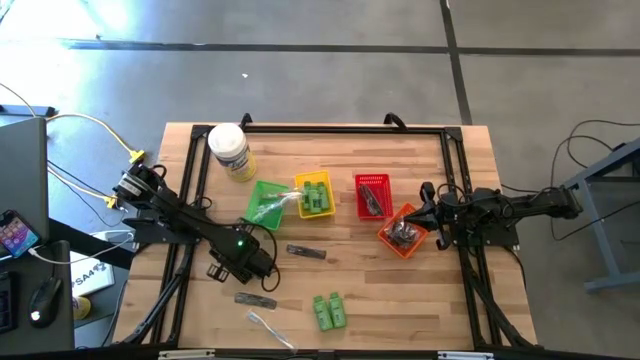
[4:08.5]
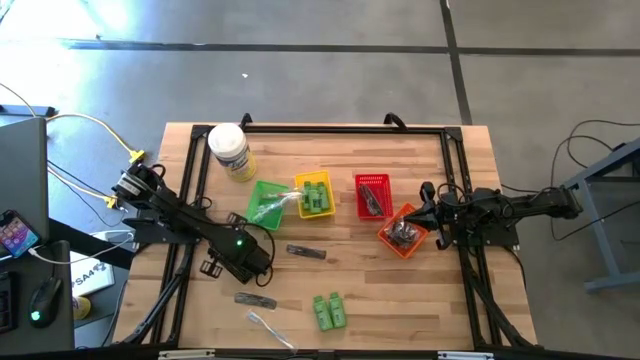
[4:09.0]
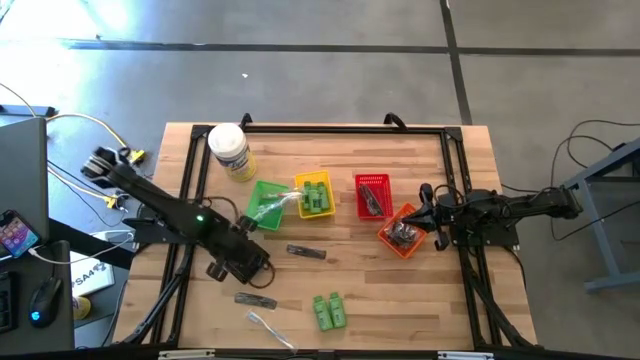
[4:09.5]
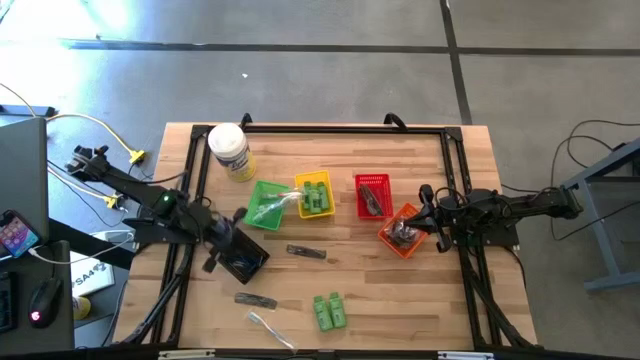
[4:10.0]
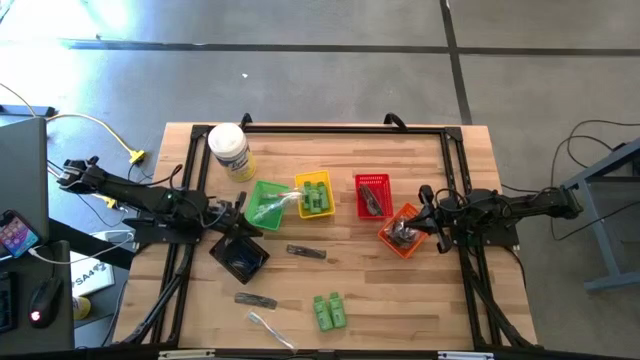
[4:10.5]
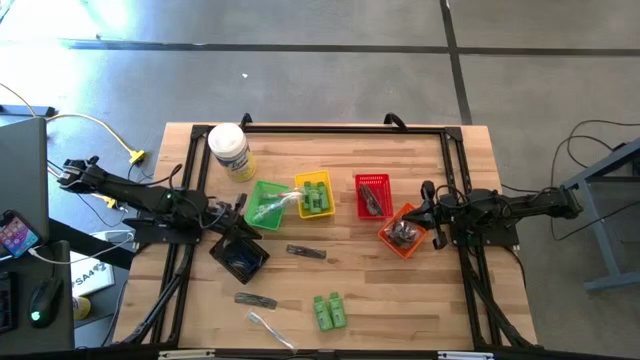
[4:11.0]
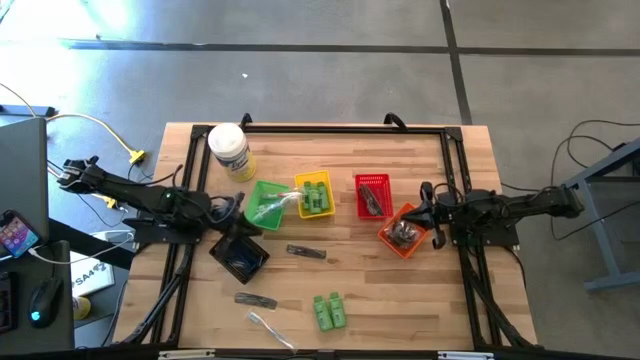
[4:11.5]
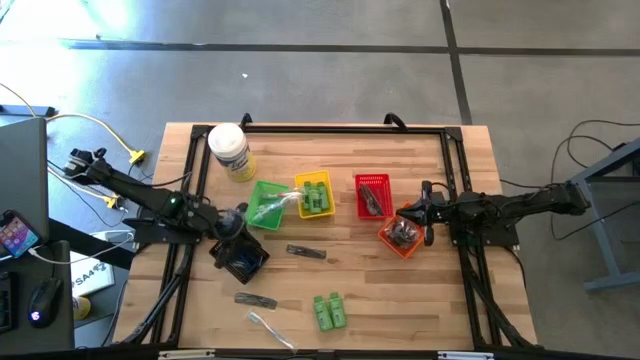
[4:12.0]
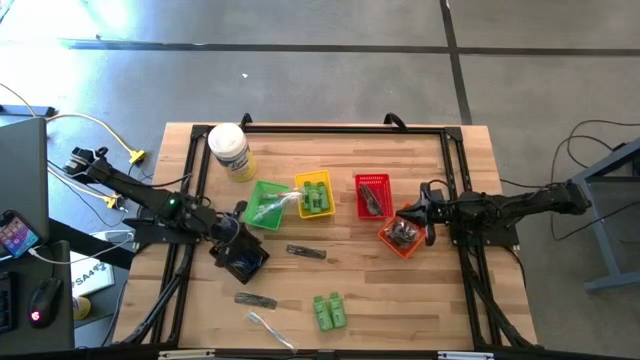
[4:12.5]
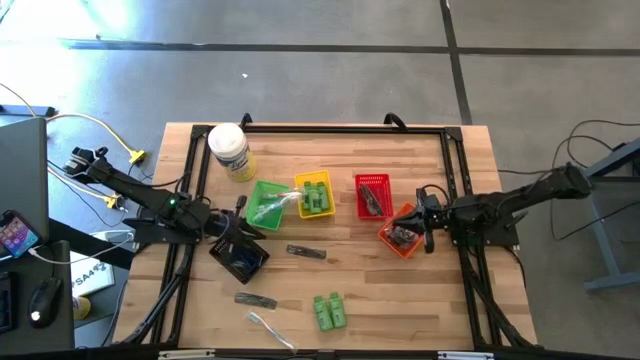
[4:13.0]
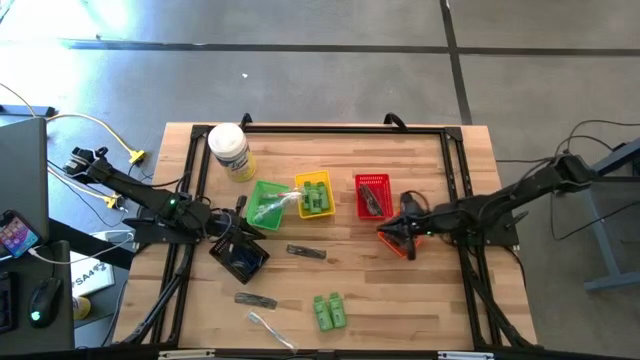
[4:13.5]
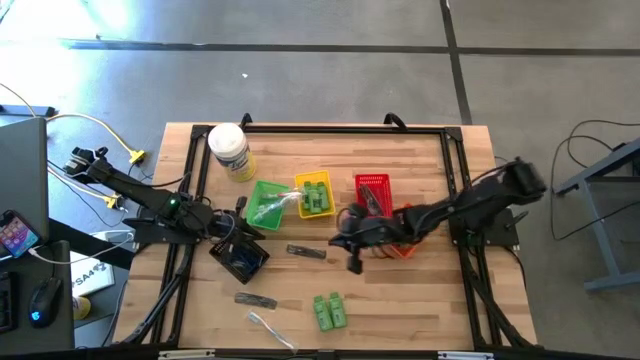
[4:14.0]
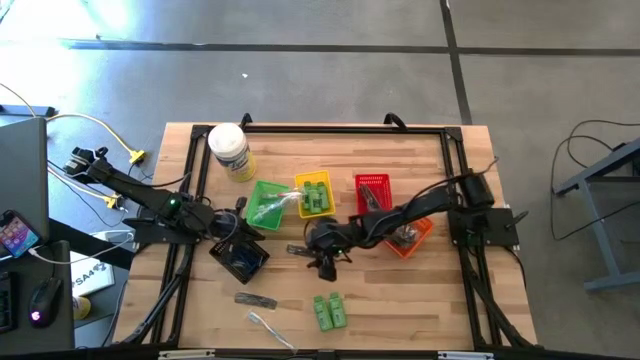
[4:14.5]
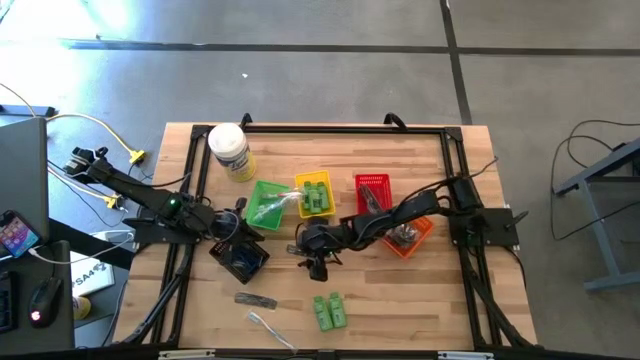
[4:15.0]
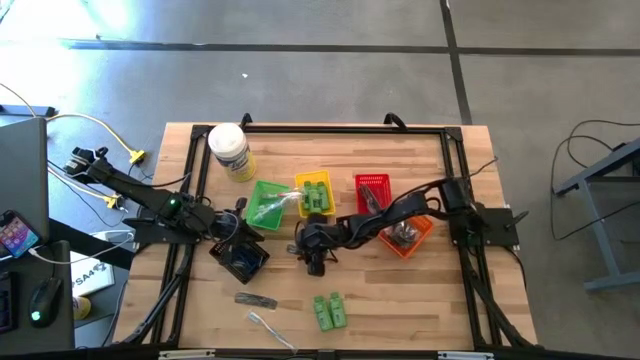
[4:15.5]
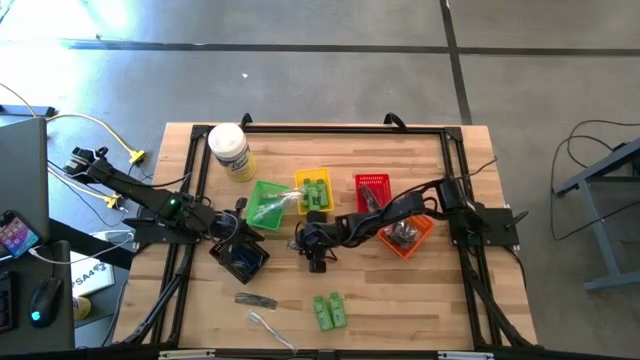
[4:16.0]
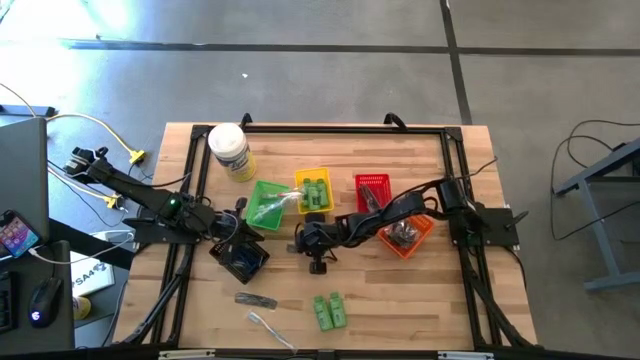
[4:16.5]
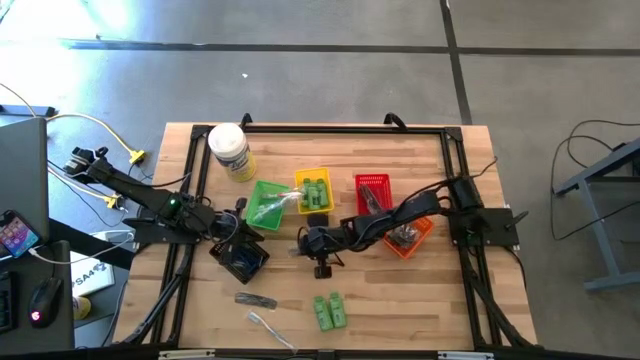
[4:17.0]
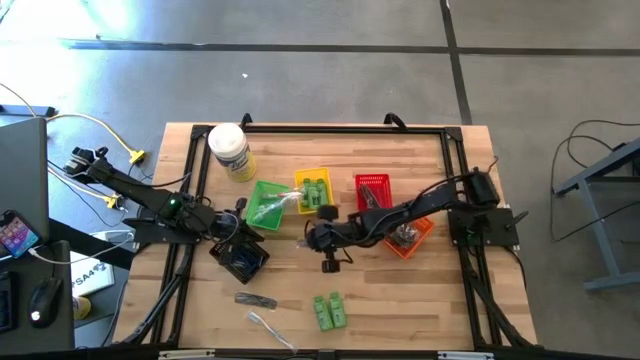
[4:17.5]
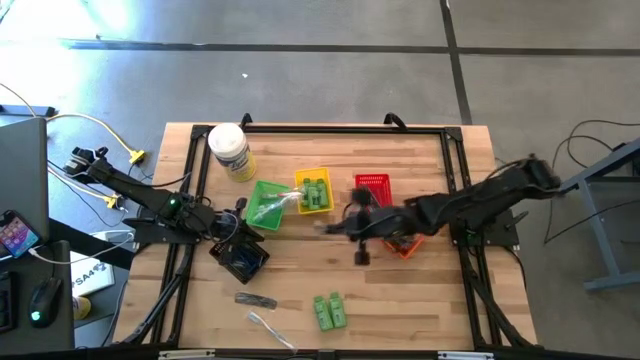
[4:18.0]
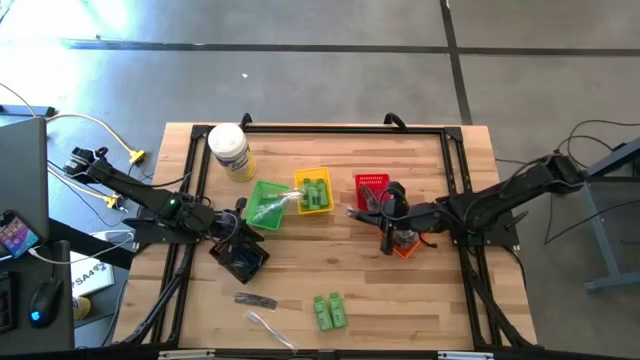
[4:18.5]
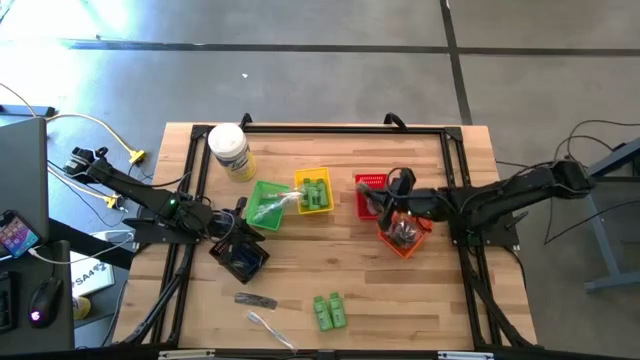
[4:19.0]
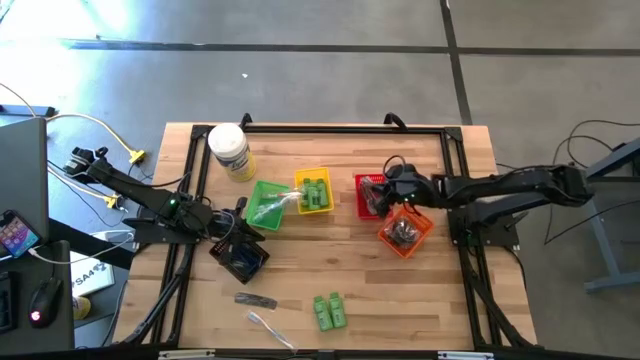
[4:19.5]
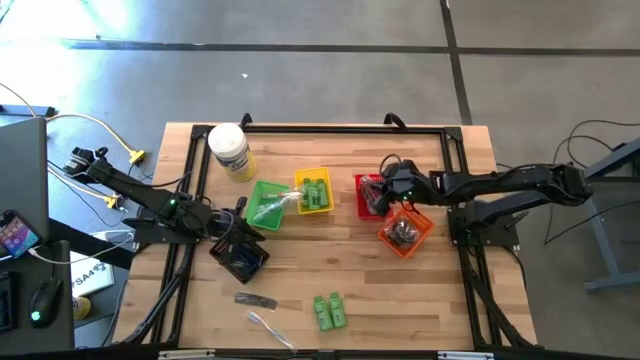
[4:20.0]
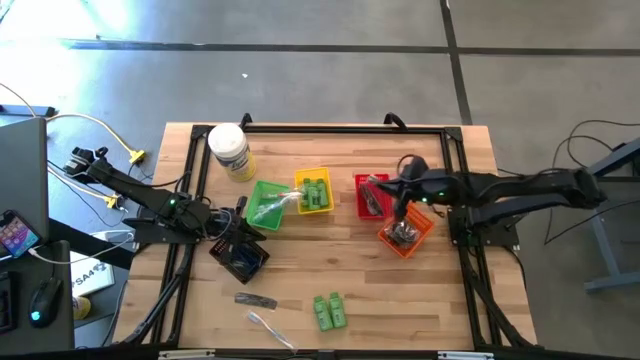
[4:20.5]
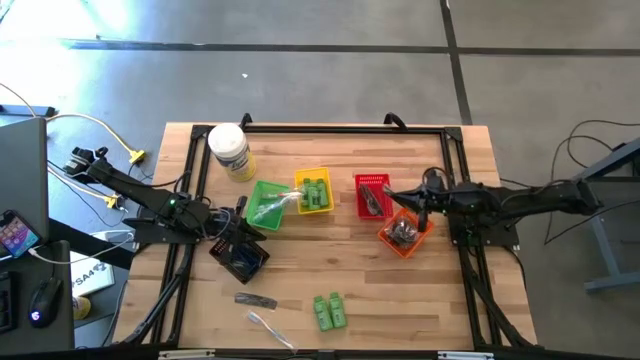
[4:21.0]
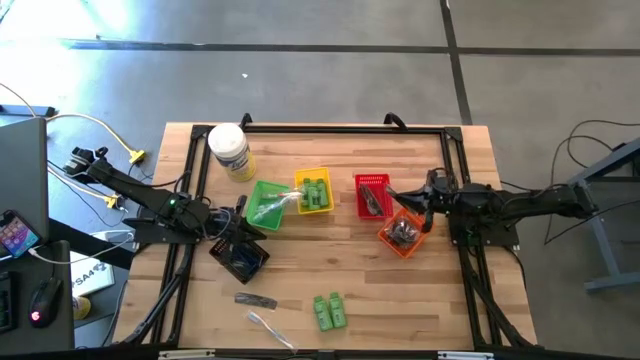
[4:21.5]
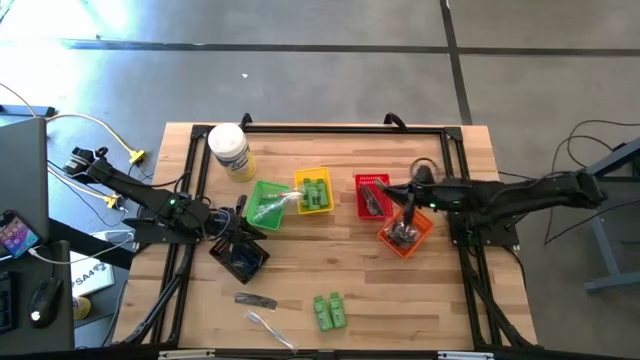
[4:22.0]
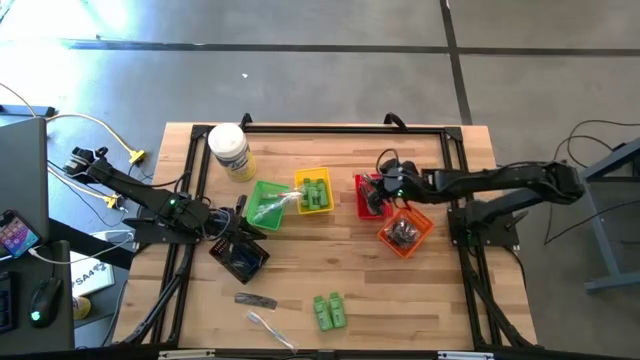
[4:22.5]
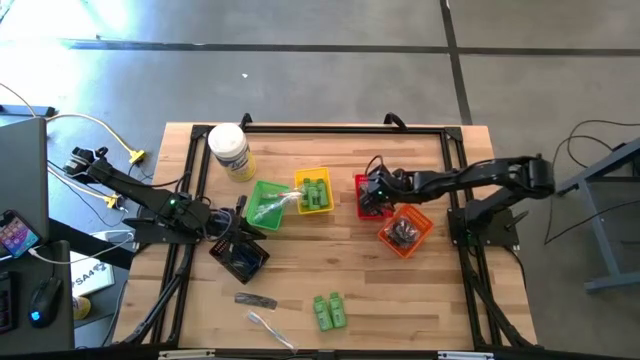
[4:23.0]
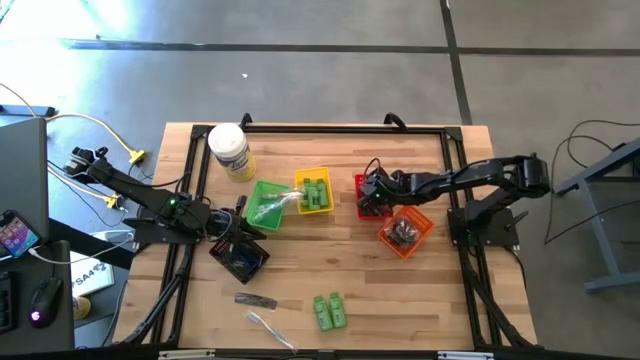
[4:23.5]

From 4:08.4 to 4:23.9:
Task: Pick & Place Travel size toiletries
Put the top black comb into the red basket

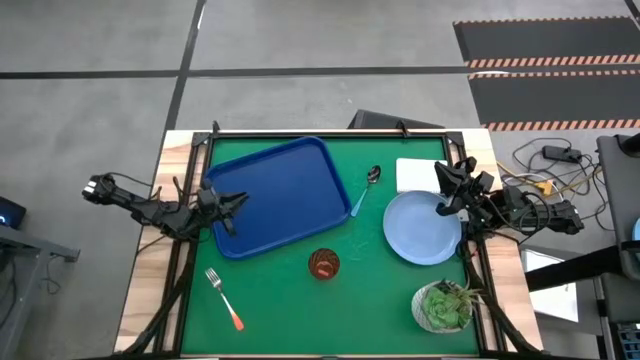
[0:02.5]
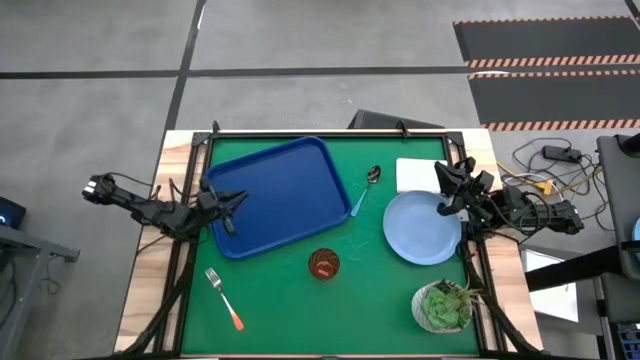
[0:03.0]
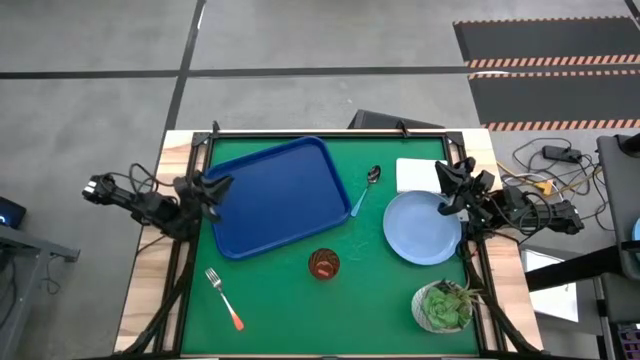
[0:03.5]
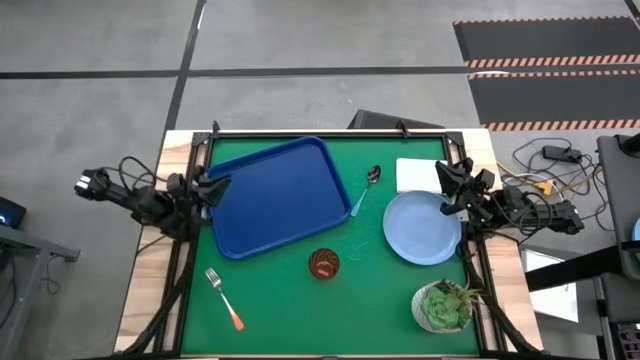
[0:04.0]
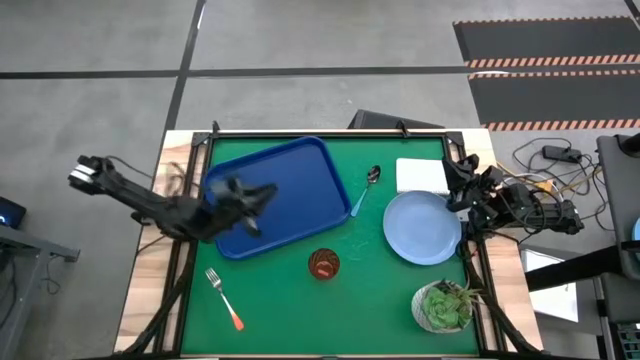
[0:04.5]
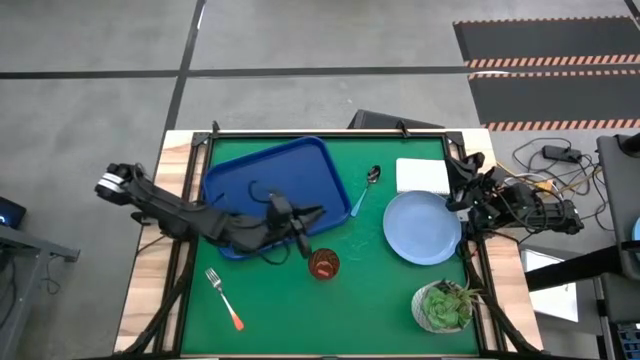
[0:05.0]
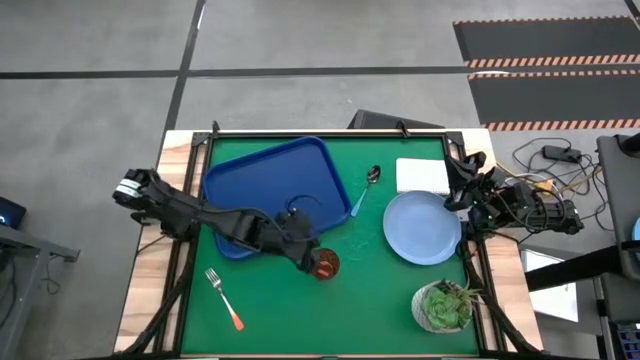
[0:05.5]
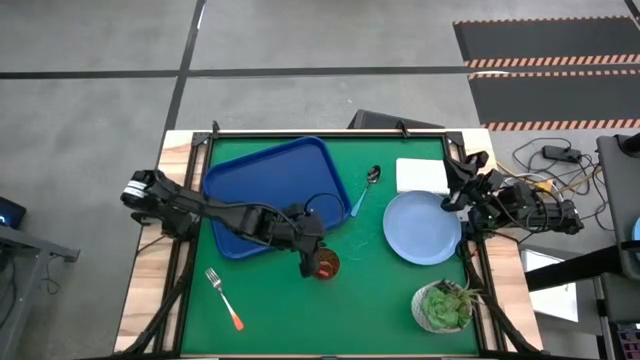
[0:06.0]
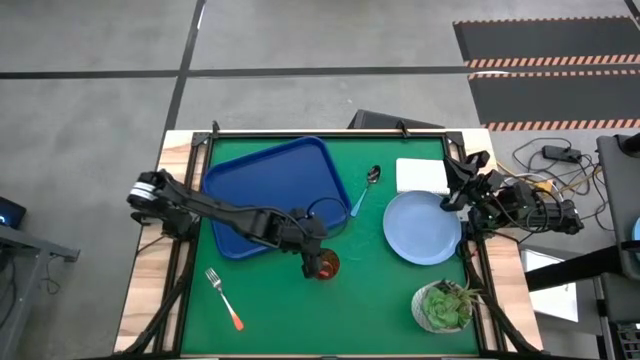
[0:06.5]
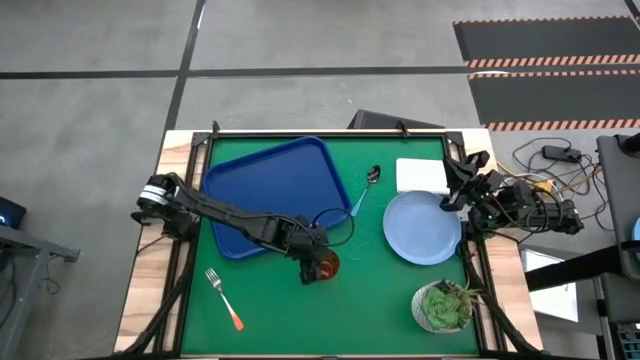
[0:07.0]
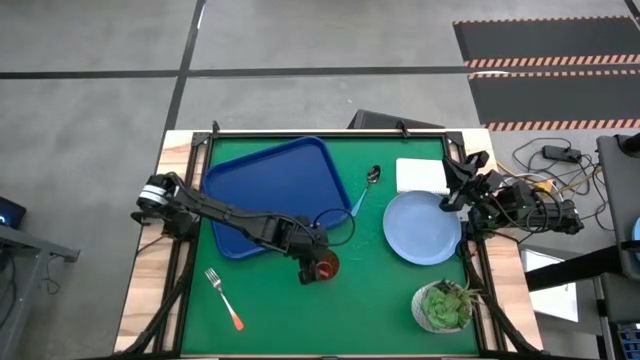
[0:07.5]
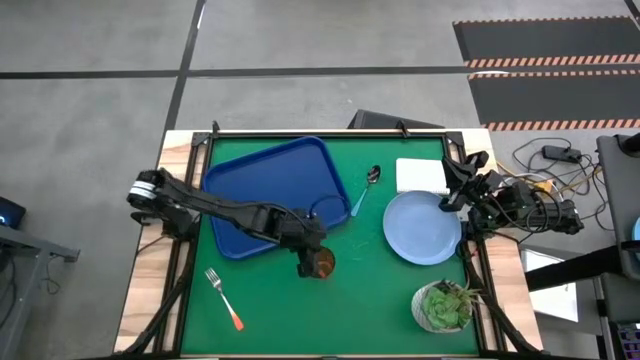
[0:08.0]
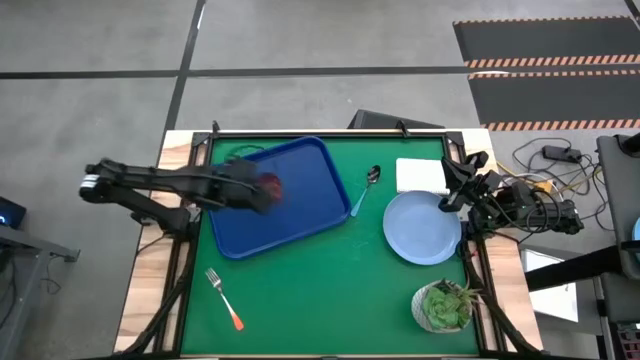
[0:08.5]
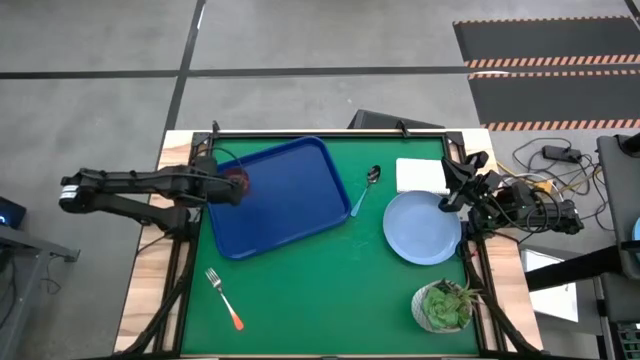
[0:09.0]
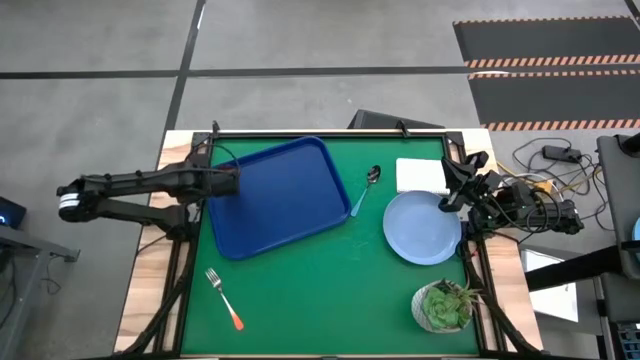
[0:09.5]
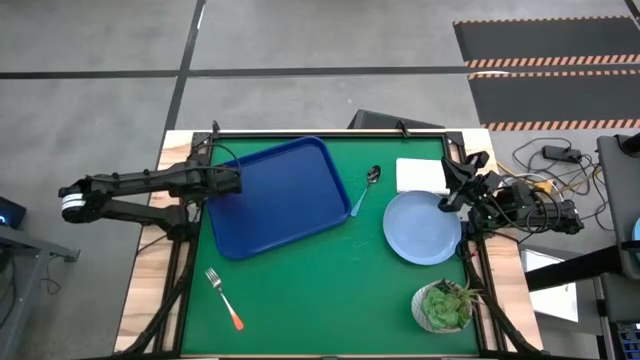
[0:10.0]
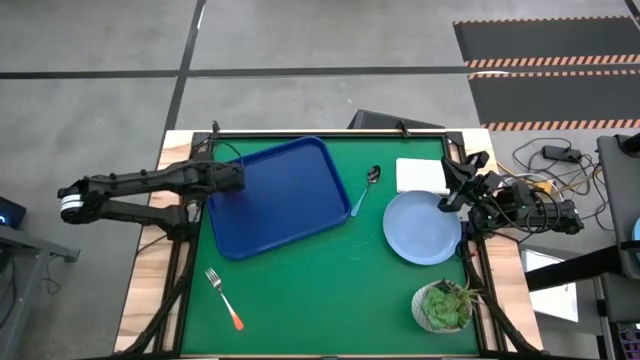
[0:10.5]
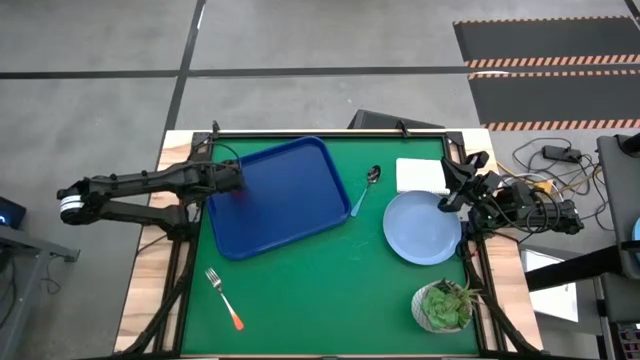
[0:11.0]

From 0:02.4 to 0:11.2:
Task: Pick and place plate/cup/fork/spoon on tray
Put the red cup to the top left on the blue serving tray
